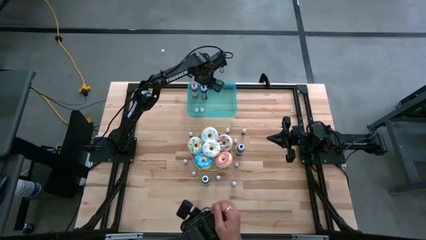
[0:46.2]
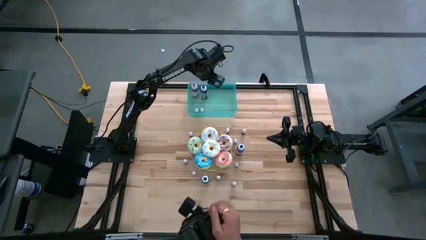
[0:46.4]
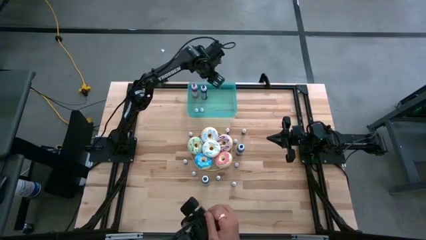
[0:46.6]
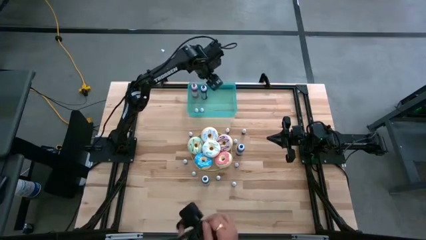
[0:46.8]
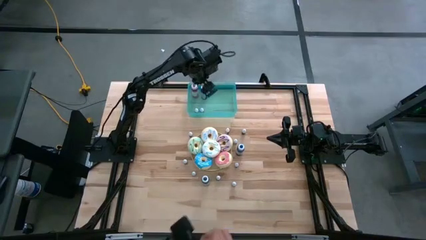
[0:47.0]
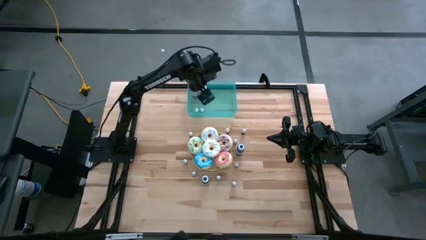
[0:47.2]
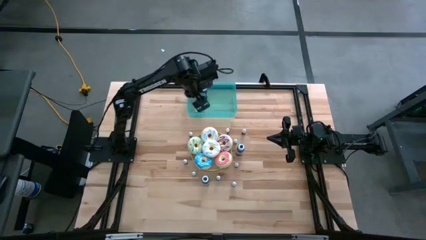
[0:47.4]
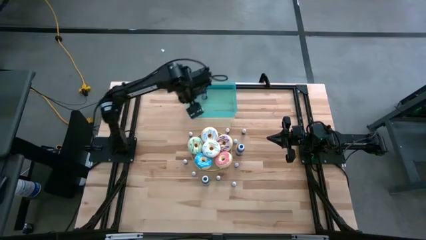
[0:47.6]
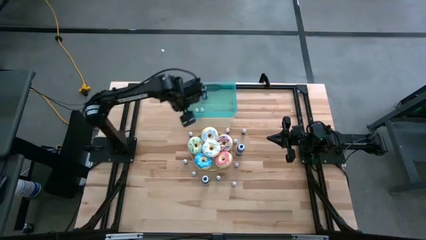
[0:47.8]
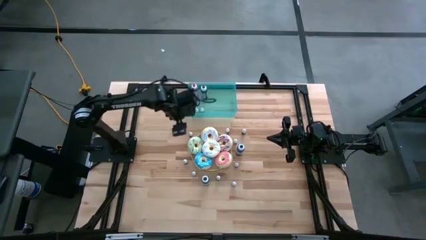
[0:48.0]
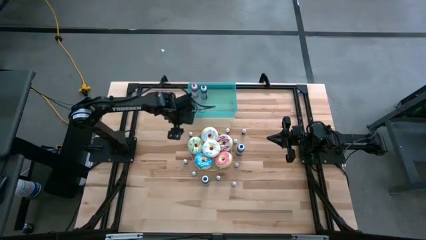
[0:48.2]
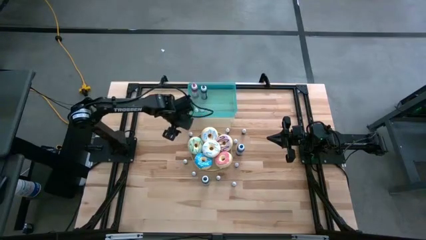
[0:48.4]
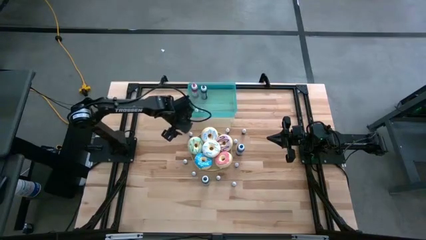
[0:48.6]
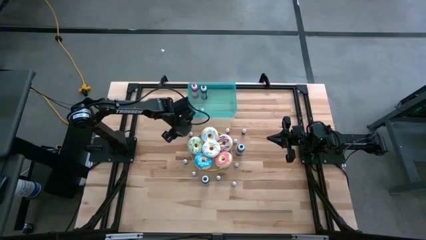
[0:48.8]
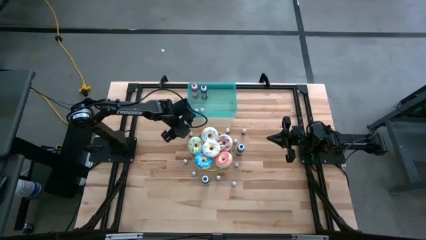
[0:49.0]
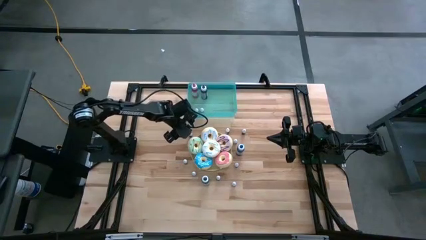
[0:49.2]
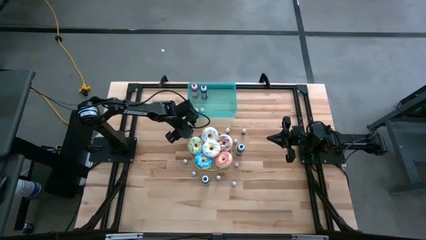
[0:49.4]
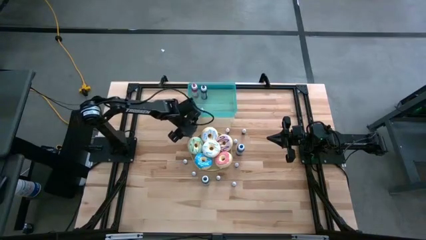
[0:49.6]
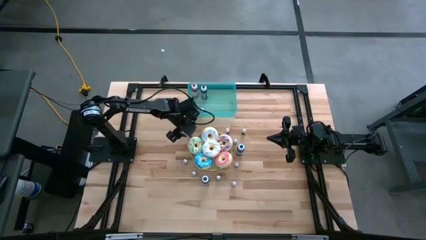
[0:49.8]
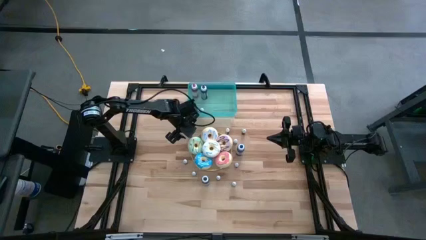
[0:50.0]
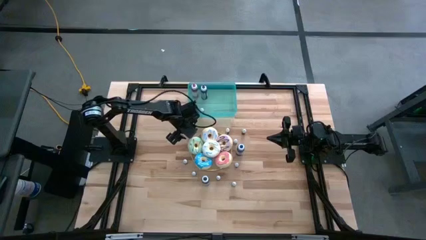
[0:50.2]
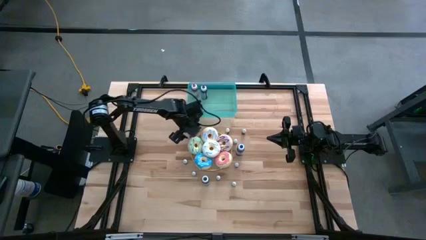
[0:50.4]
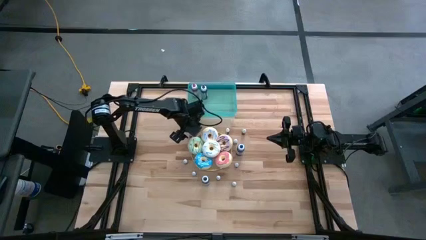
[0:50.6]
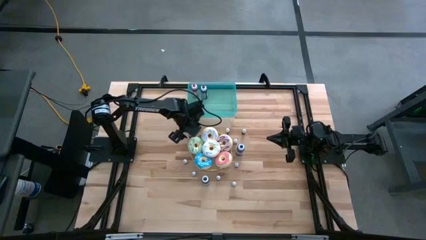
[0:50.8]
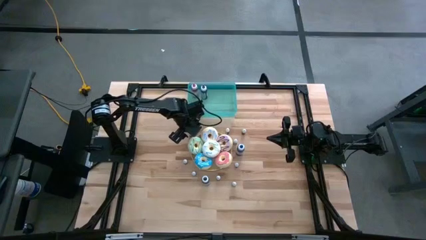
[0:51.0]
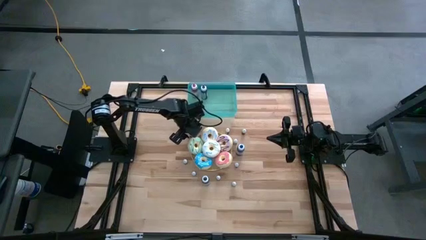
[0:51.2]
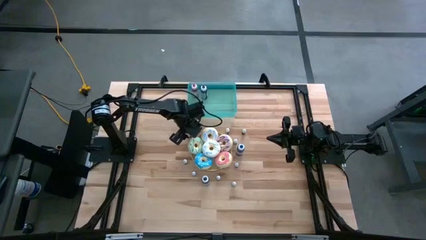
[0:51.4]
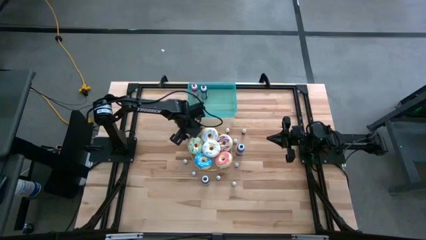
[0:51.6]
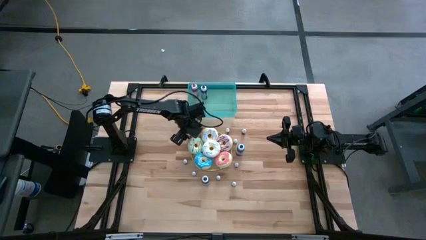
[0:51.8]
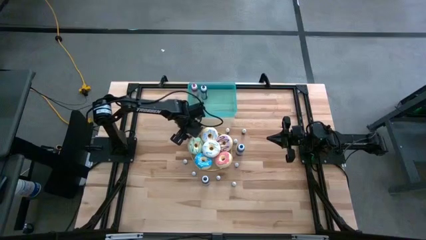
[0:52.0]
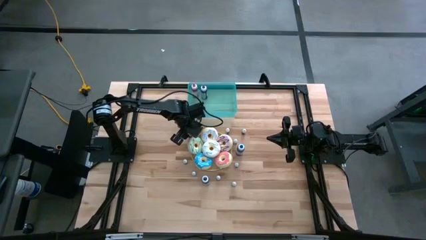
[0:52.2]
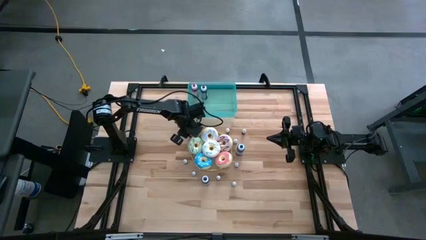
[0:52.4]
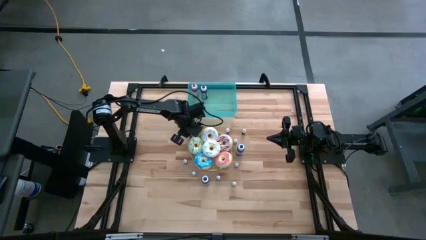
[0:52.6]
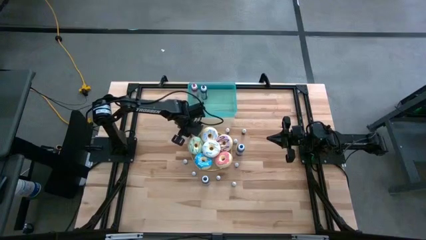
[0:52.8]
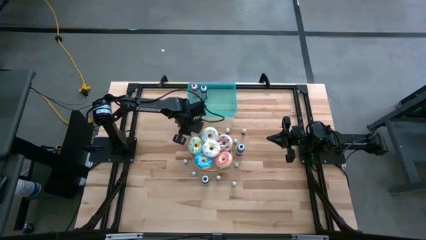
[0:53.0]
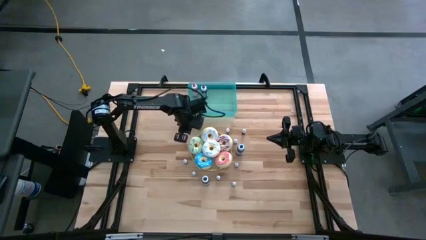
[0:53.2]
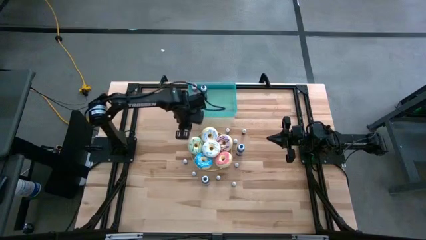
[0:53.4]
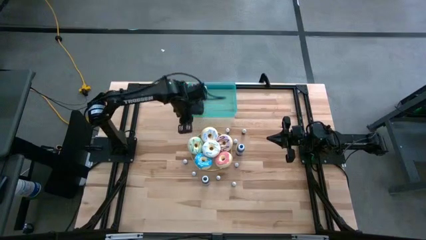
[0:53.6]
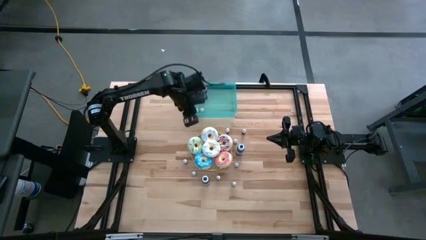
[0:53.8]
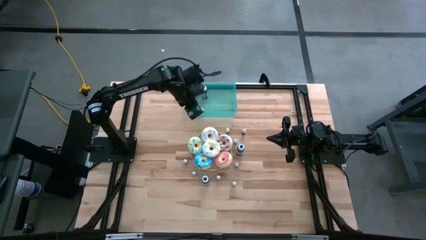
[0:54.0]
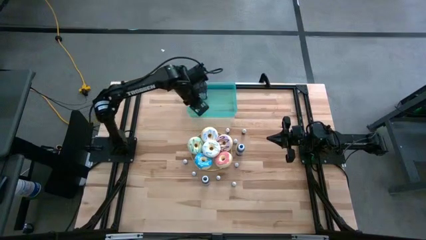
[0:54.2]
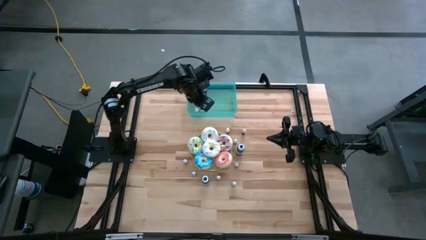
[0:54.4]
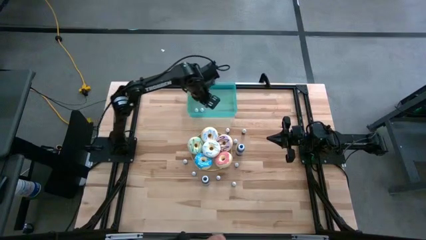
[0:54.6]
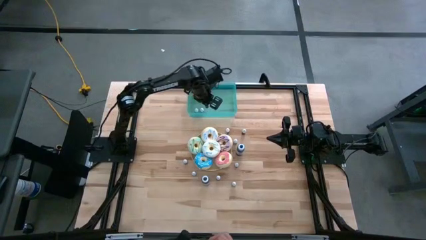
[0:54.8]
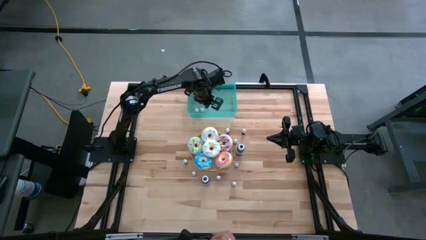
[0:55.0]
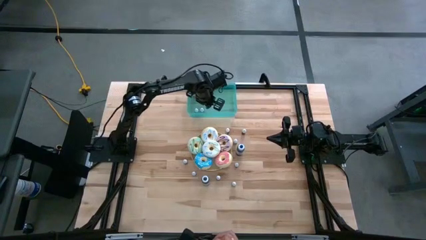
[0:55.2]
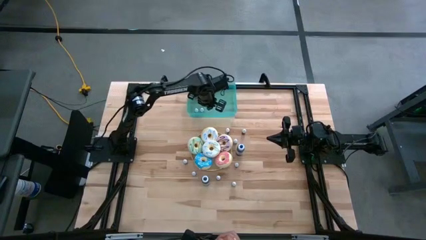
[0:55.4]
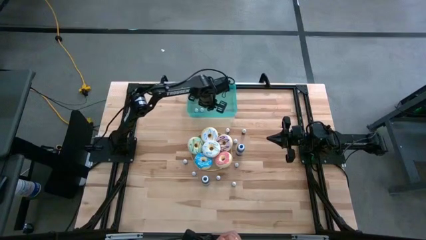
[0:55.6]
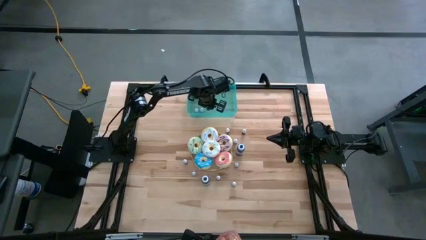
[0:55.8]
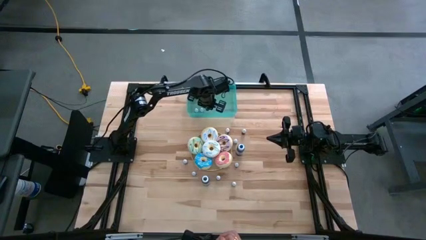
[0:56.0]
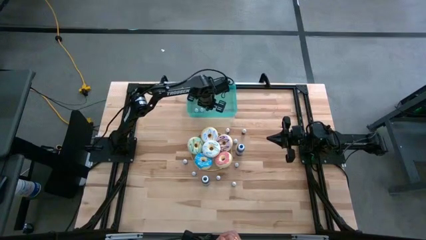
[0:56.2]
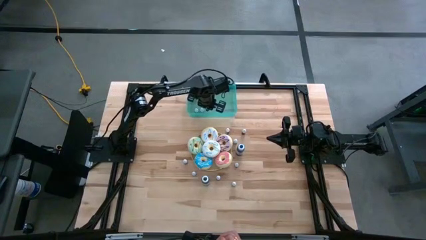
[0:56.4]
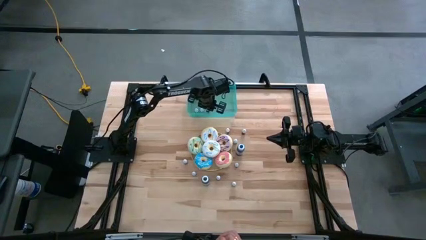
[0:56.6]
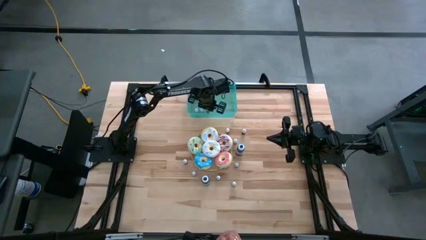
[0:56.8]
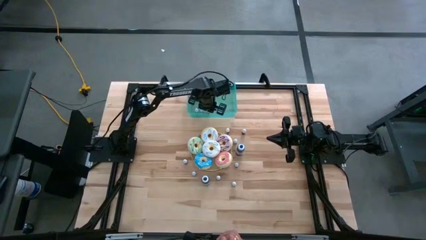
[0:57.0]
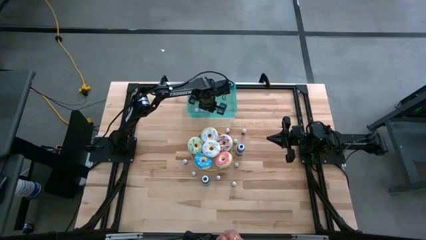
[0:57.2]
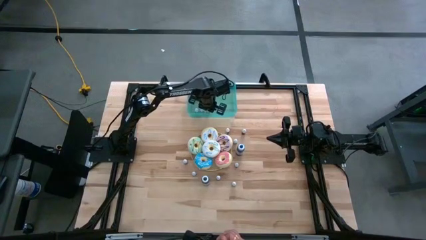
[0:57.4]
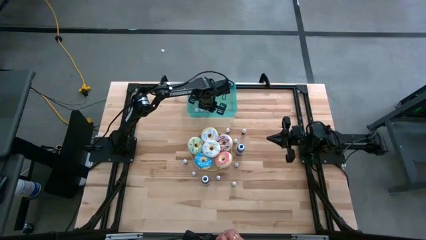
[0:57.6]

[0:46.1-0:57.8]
Task: Pick & Place food coloring
Put the small purple food coloring bottle into the green container

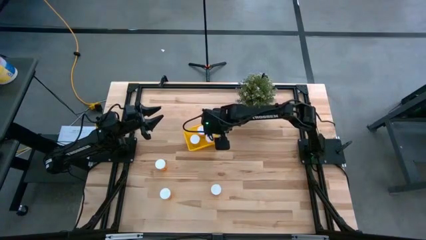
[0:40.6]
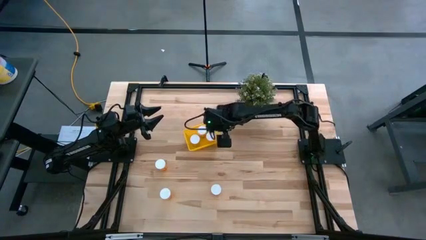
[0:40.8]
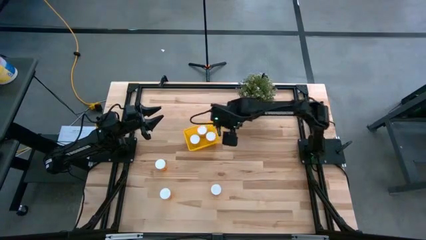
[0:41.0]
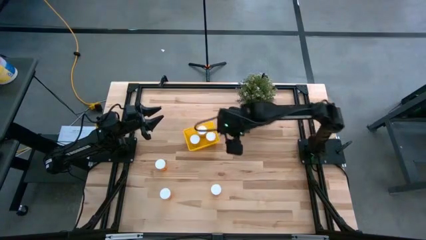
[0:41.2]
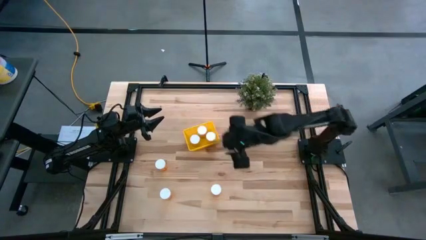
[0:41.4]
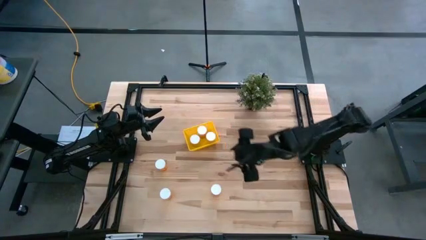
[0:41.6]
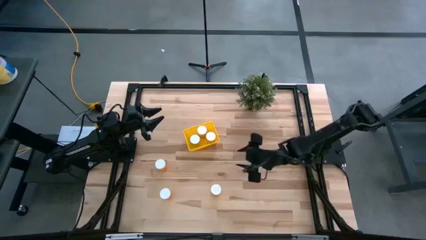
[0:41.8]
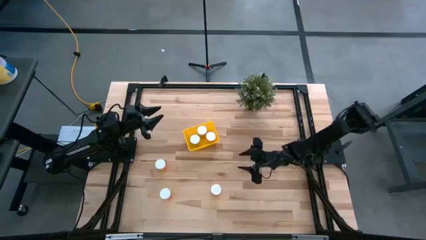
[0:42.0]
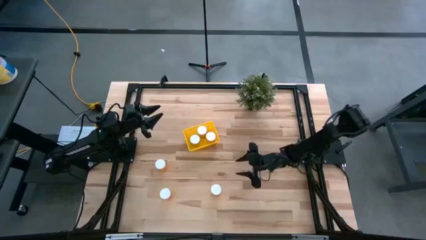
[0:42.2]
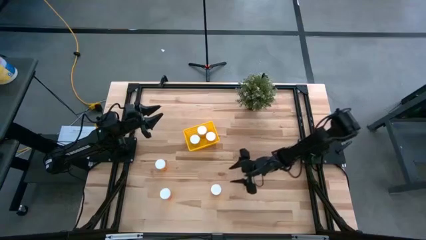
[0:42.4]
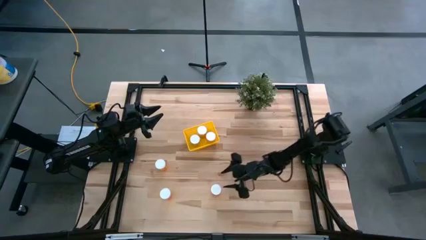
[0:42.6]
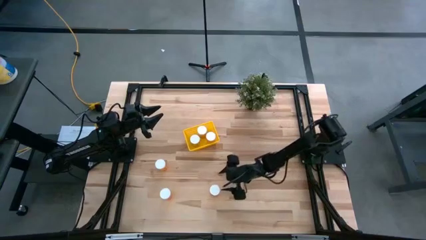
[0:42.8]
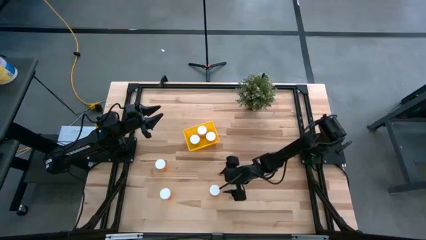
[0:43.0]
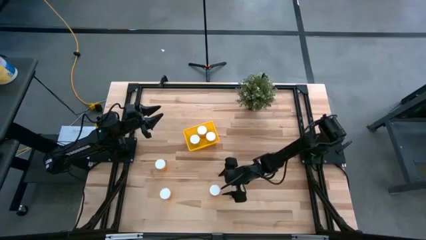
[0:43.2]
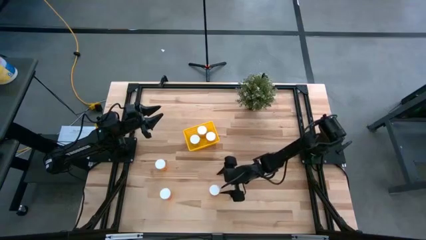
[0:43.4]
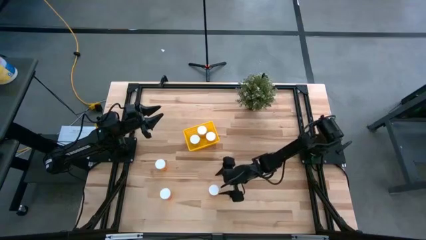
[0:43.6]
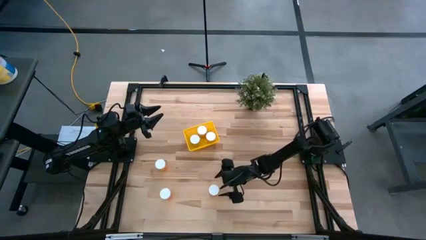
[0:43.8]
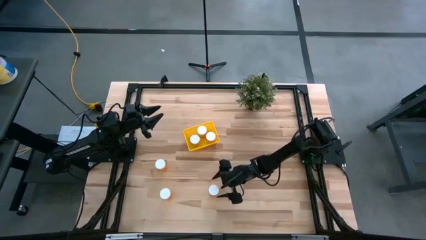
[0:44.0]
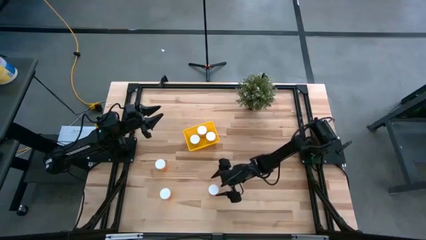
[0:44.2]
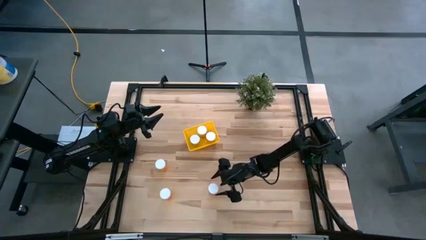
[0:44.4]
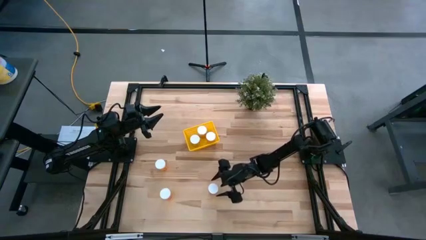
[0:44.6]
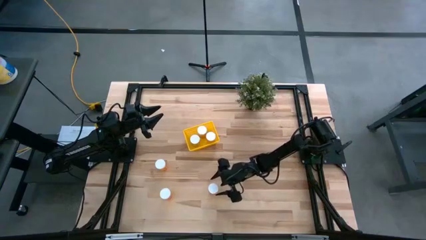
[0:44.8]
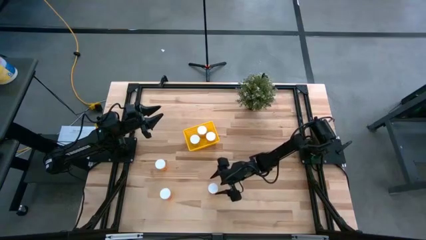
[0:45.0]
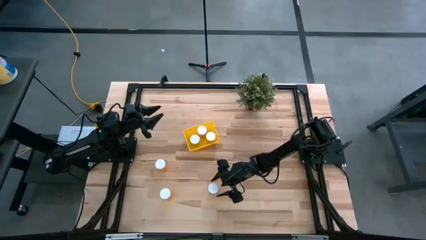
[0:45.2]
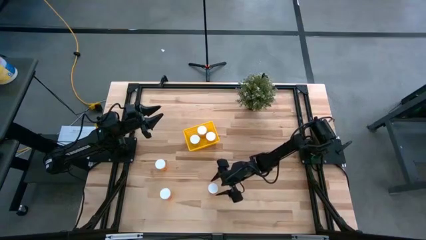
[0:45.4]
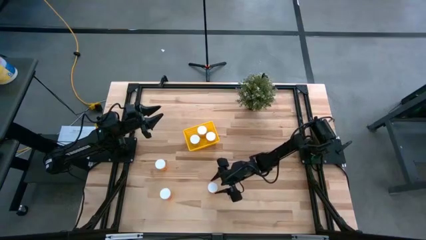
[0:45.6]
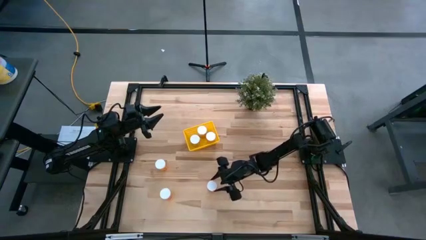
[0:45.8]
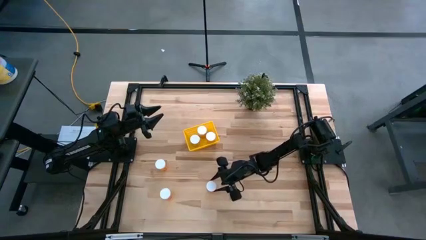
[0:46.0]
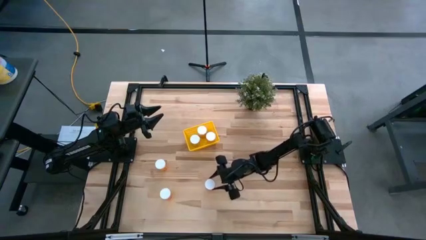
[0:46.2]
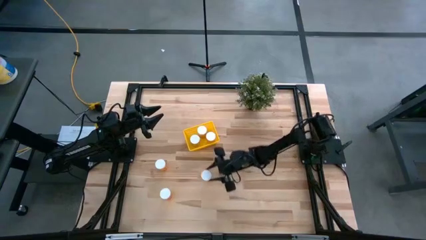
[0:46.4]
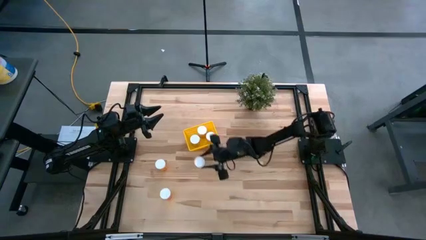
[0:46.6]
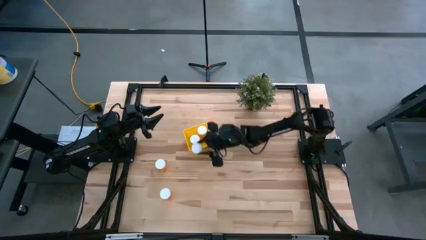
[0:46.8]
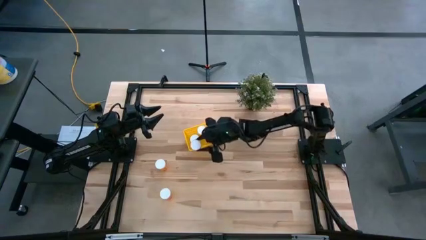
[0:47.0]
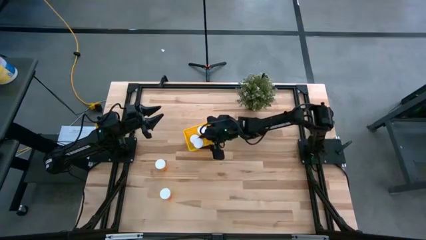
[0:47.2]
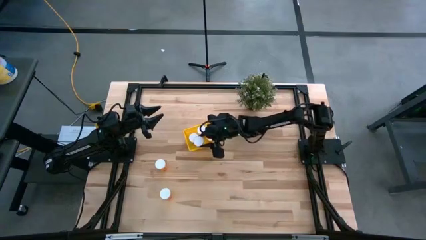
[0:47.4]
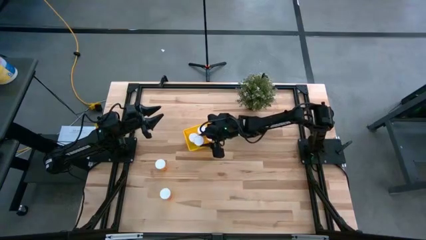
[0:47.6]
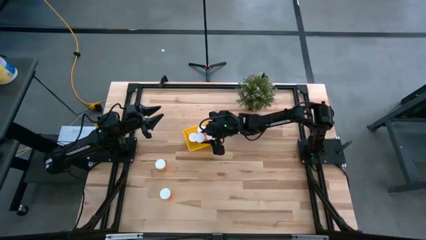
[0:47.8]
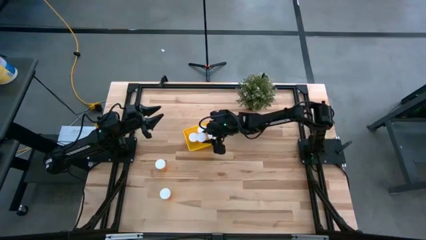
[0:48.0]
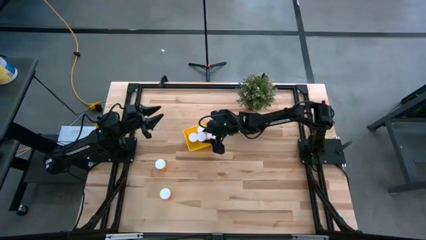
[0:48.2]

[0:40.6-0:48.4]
Task: Pick and place pill bottles into a basket
Put the orange pill bottle into the yellow bin
